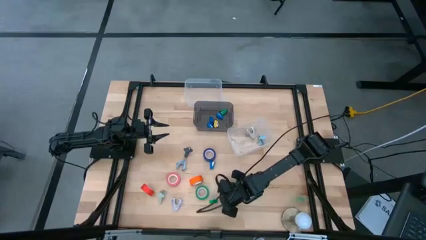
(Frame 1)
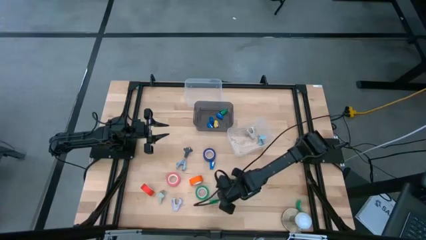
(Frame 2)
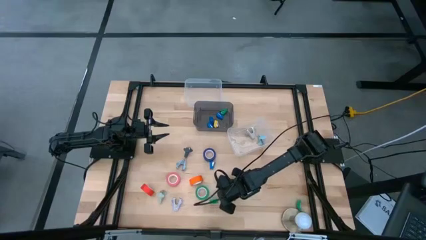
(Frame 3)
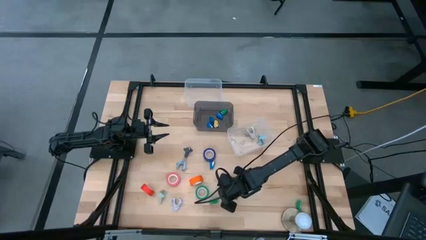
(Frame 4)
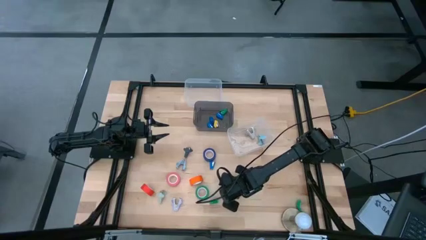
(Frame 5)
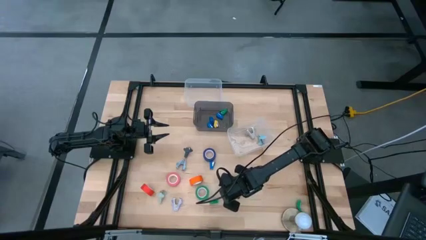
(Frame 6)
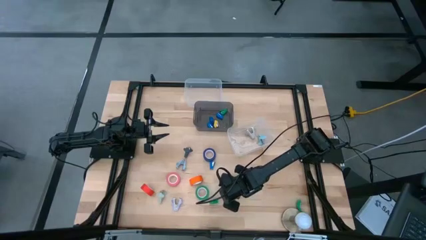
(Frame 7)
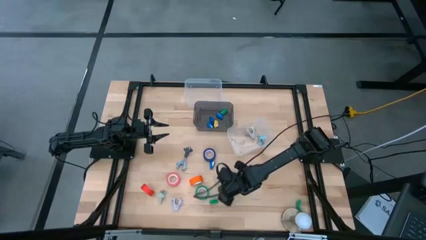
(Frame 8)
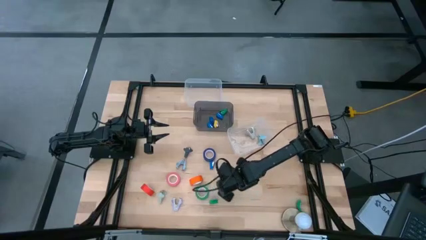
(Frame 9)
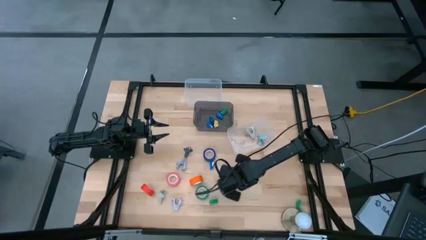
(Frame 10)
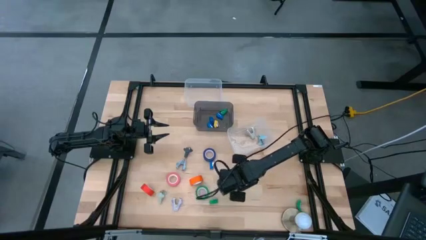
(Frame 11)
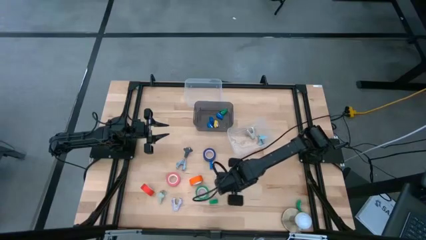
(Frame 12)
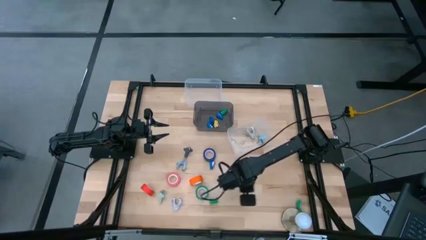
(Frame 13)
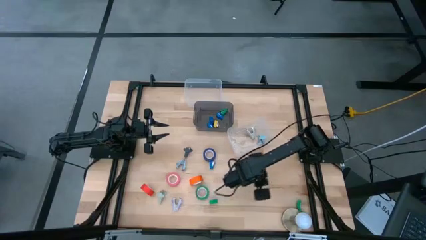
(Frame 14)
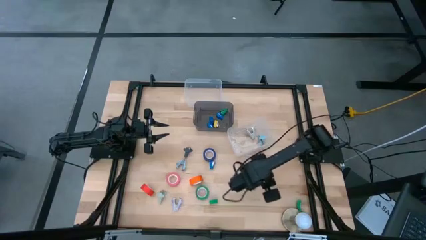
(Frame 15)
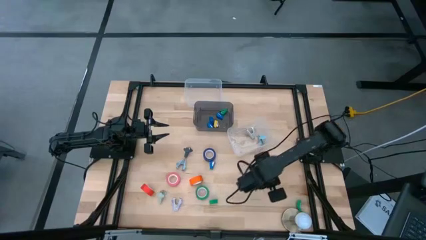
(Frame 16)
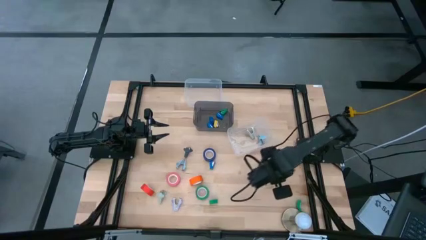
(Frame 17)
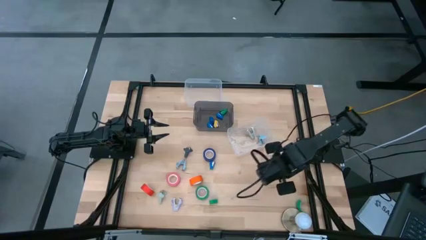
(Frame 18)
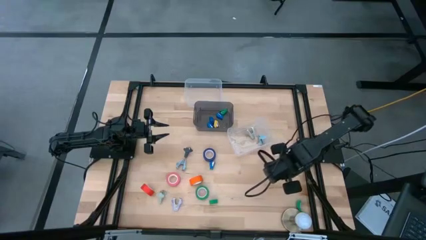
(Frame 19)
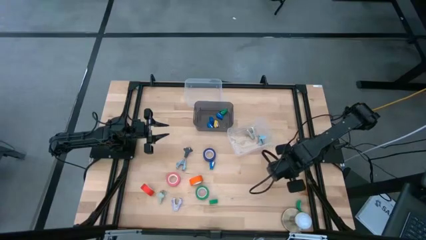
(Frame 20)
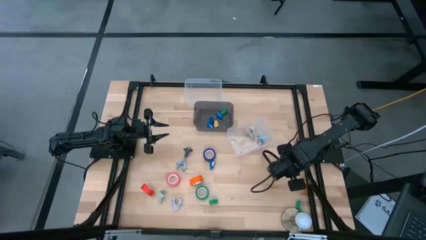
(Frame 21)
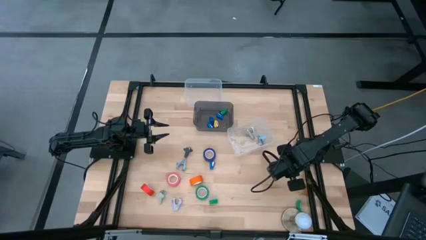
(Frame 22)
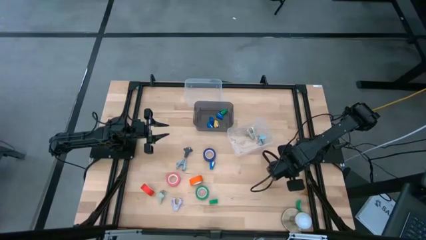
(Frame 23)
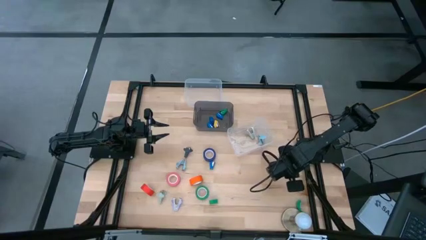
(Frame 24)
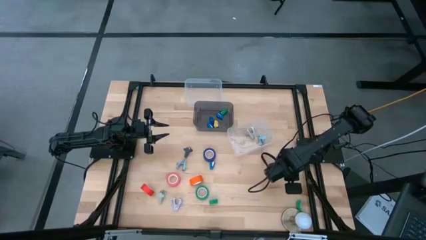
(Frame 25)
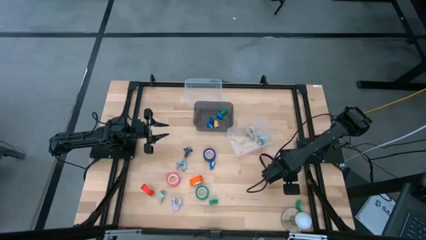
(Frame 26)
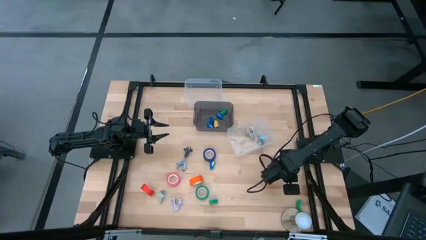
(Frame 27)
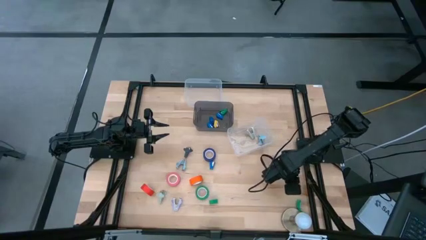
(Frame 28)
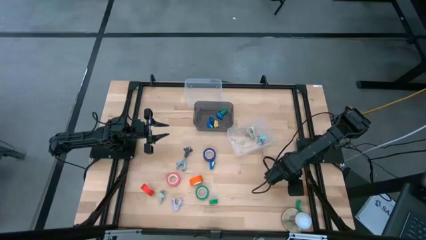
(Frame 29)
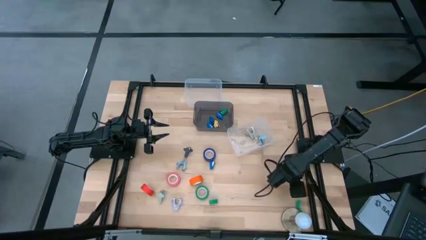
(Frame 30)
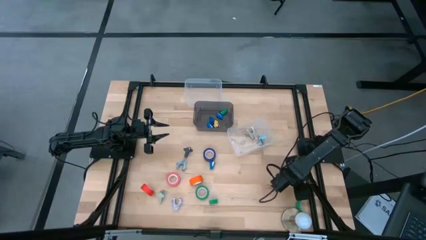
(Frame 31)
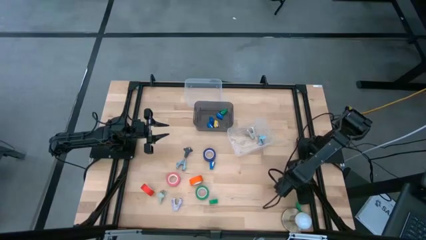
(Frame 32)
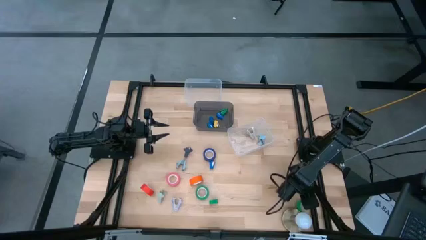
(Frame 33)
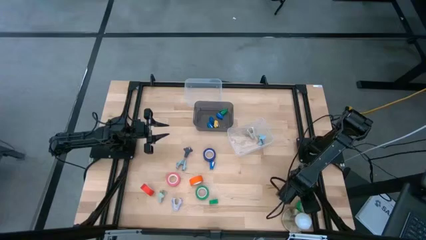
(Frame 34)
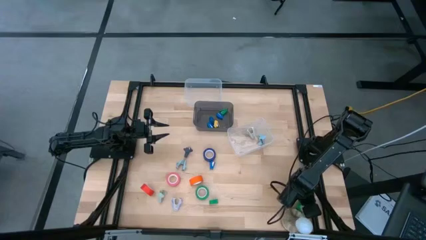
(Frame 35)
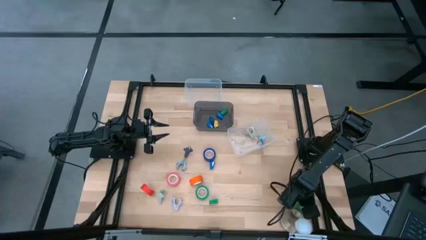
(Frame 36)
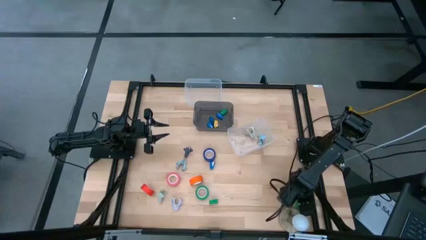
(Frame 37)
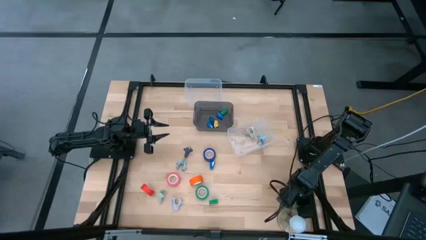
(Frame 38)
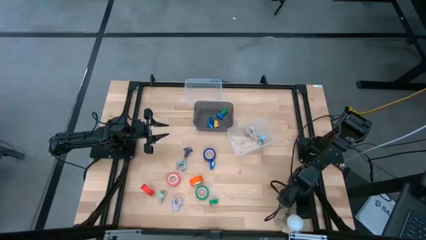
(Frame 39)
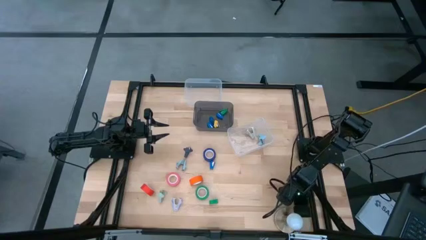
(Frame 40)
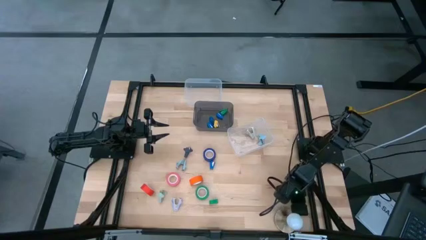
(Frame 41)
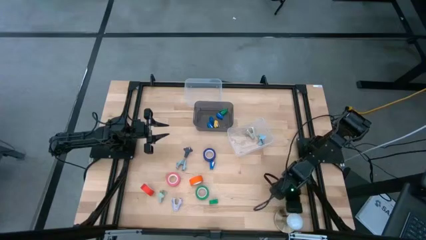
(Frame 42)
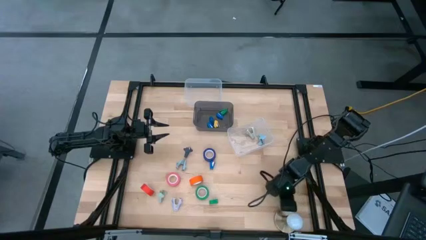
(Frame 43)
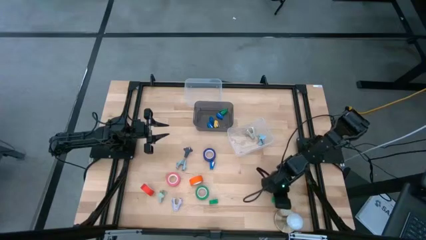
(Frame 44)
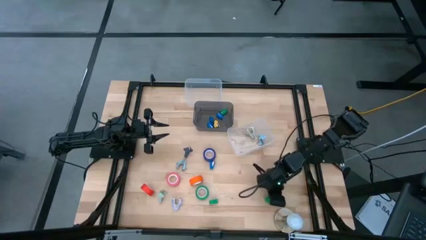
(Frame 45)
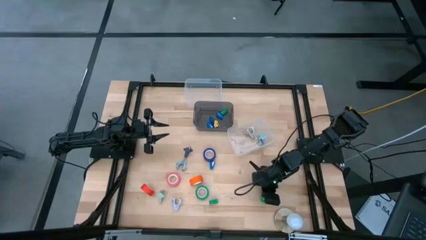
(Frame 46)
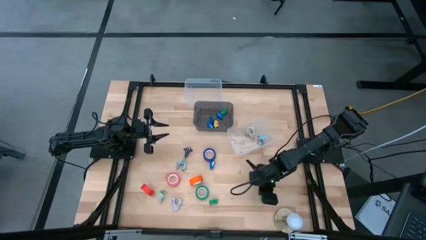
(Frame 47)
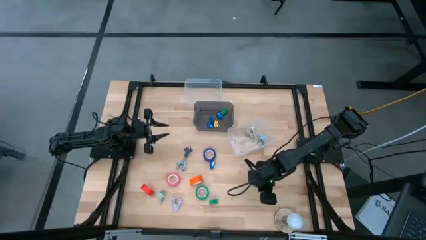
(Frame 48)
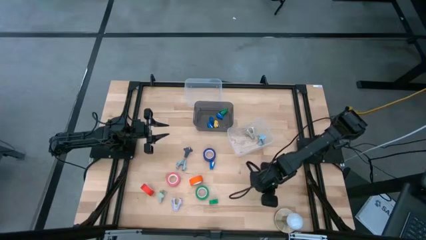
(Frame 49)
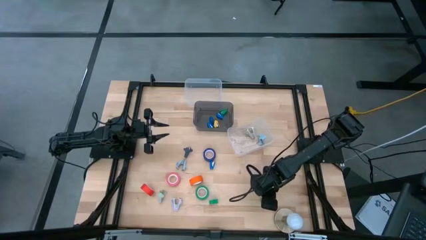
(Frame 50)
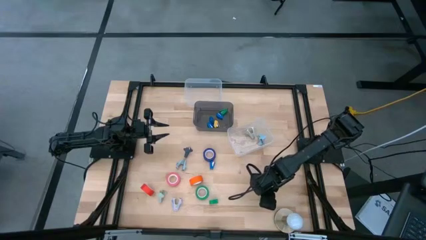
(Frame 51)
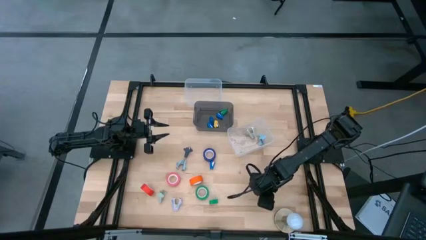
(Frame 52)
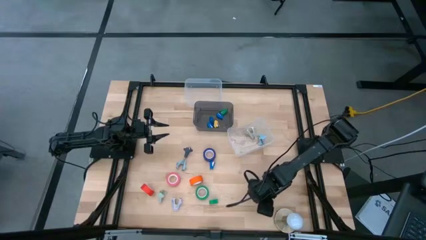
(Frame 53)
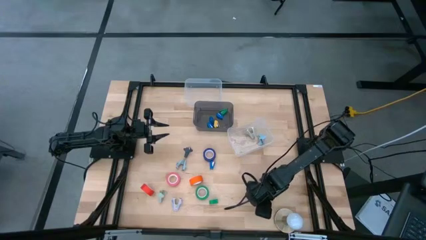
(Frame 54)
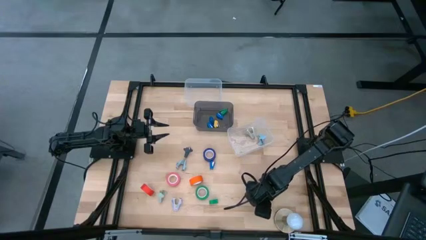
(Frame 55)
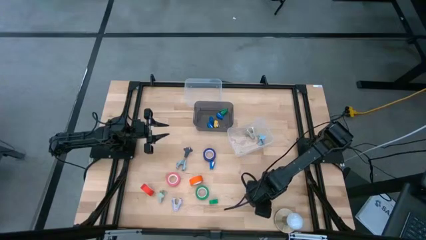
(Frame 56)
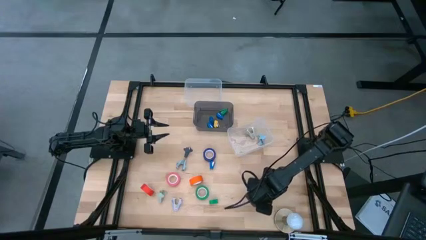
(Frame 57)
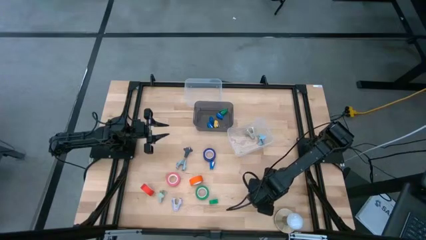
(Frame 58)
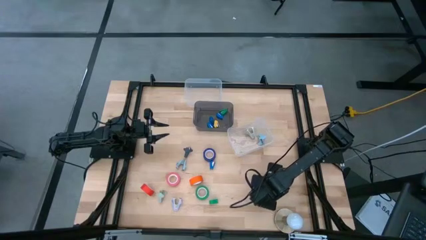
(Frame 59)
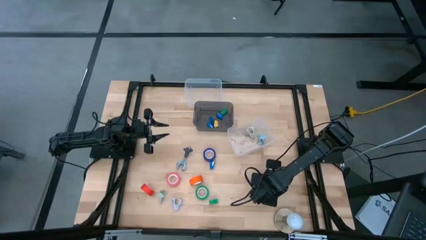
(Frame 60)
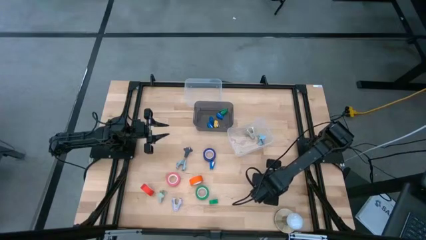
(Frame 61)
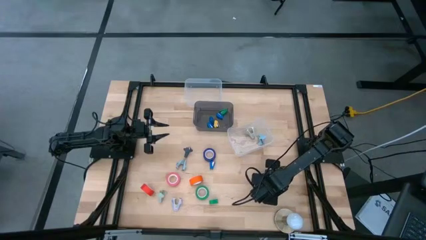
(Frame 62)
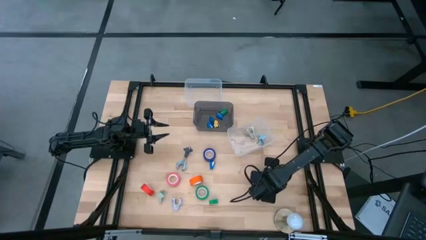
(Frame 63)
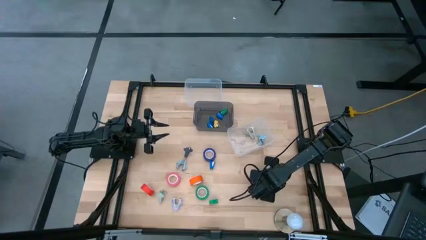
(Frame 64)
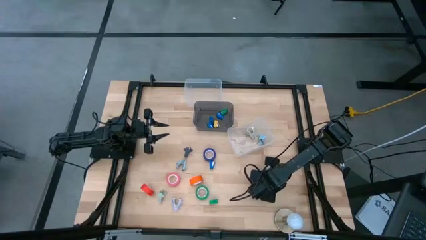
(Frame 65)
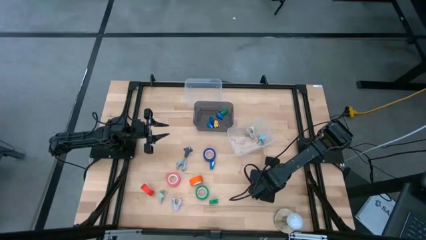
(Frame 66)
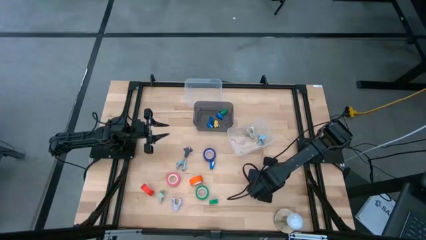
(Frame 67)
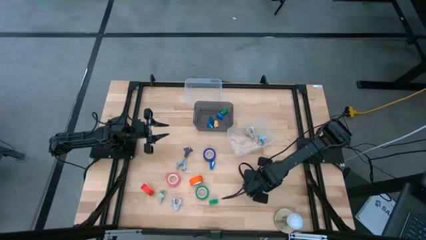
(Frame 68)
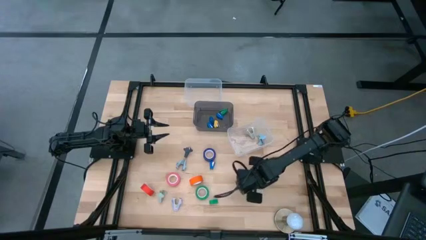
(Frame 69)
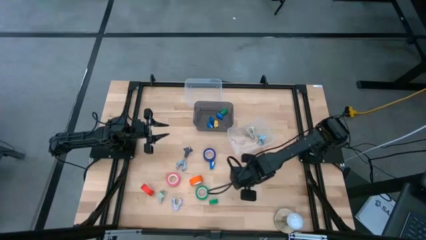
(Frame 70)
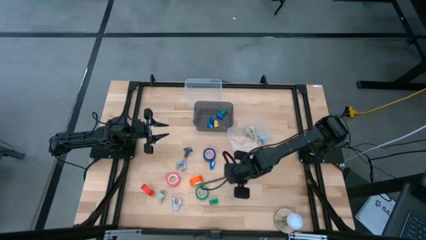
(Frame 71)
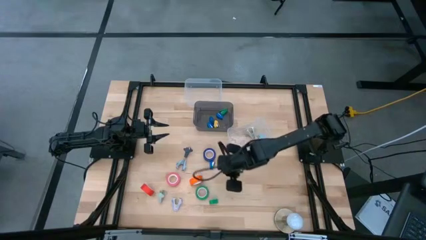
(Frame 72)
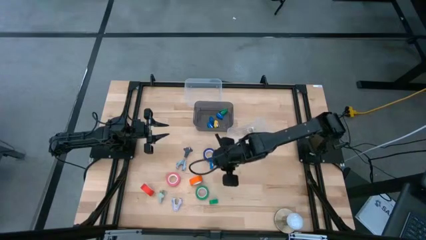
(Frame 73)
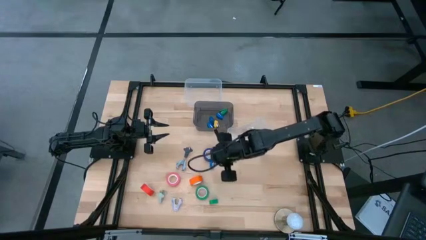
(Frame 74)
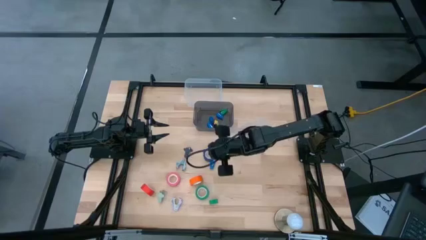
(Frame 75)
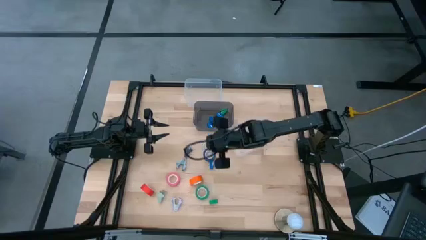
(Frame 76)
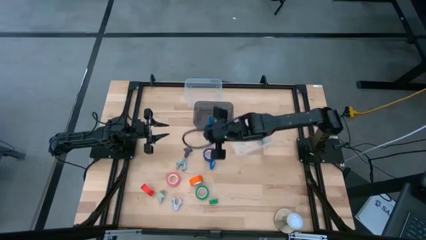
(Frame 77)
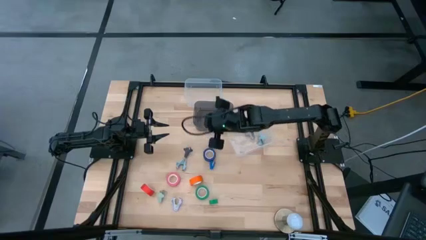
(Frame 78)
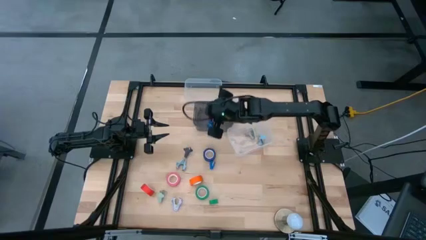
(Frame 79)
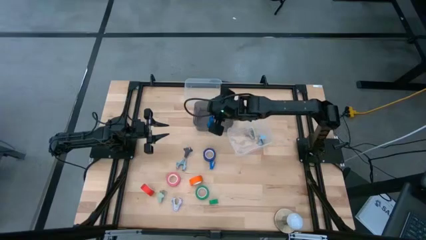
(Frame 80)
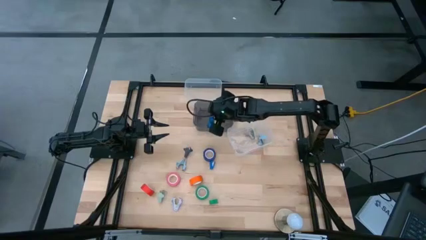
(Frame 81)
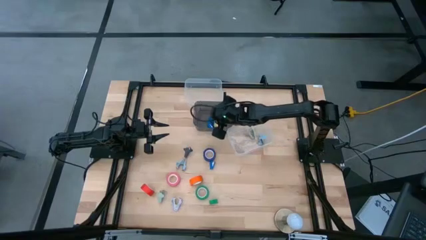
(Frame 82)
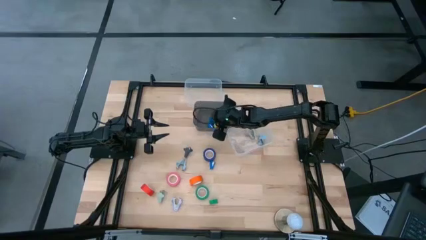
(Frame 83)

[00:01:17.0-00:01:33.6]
Task: Pick and place Stapler, Stapler remover, tape
Put the green stapler into the black bin
